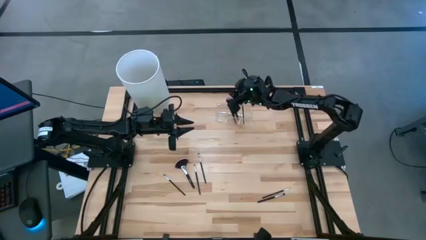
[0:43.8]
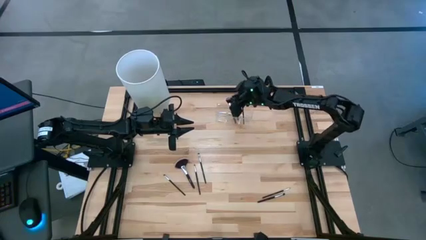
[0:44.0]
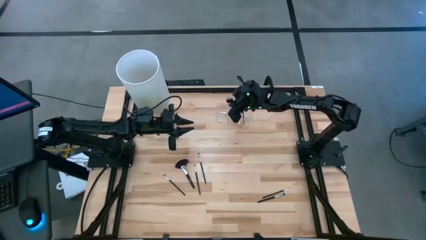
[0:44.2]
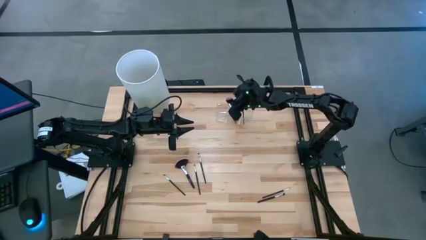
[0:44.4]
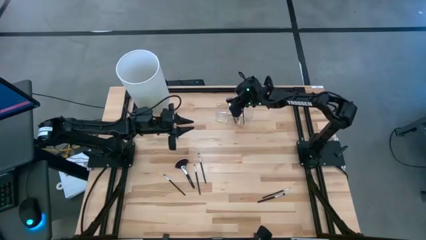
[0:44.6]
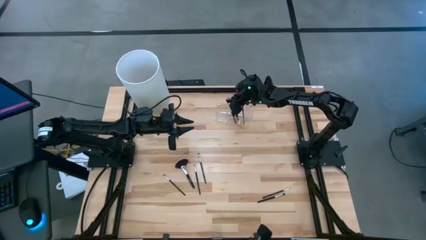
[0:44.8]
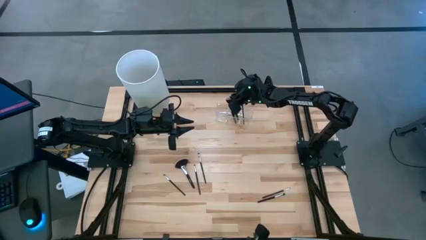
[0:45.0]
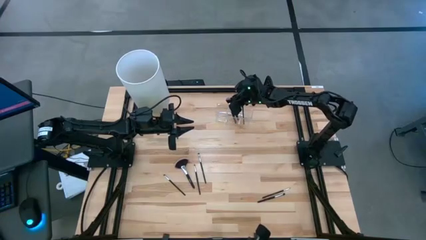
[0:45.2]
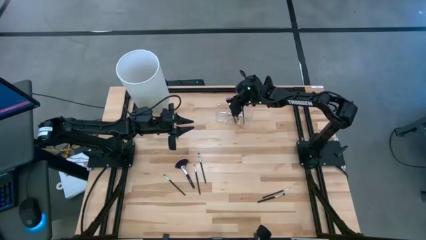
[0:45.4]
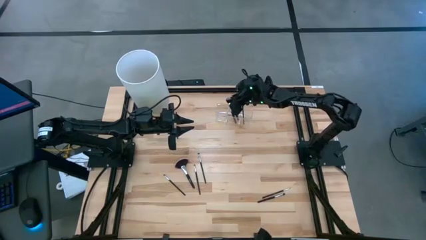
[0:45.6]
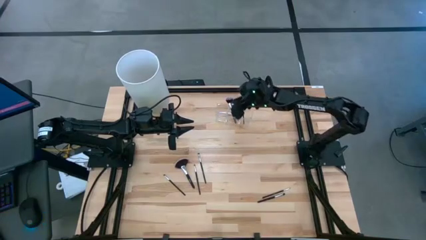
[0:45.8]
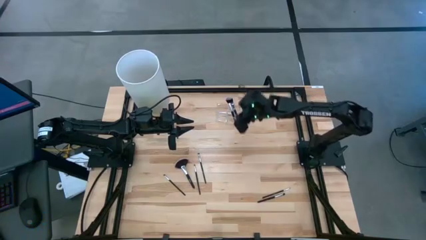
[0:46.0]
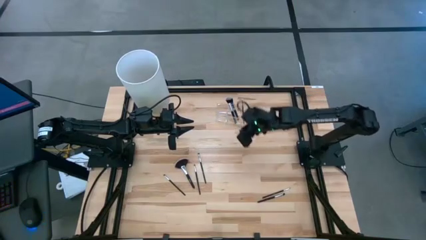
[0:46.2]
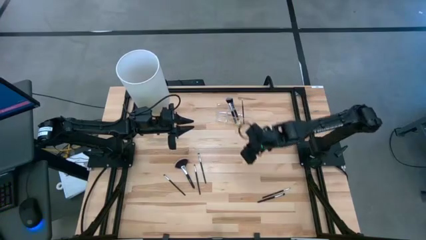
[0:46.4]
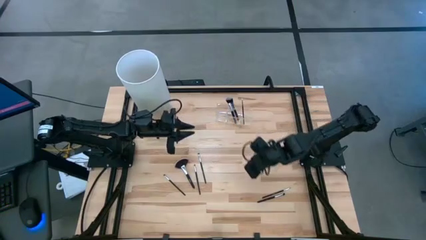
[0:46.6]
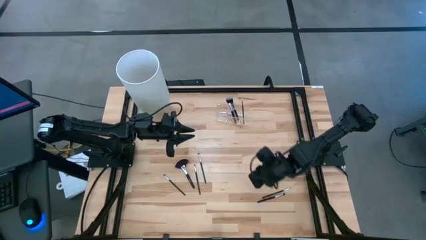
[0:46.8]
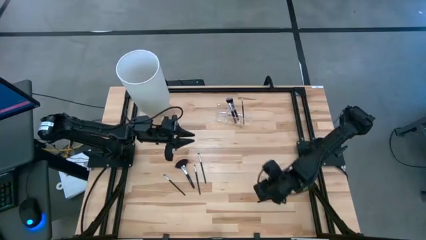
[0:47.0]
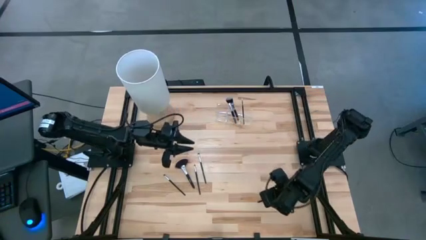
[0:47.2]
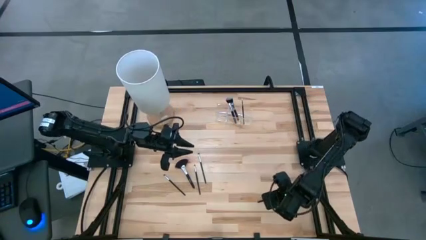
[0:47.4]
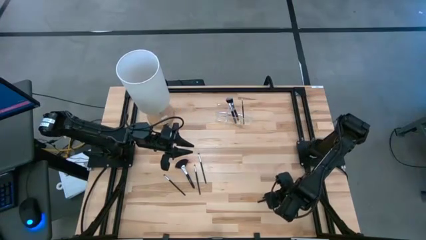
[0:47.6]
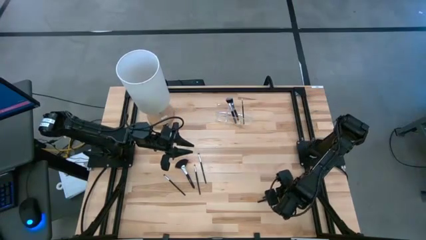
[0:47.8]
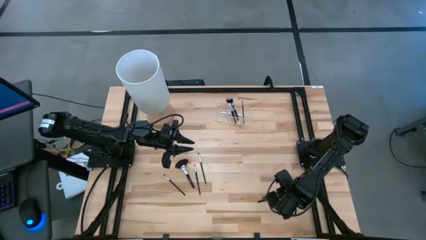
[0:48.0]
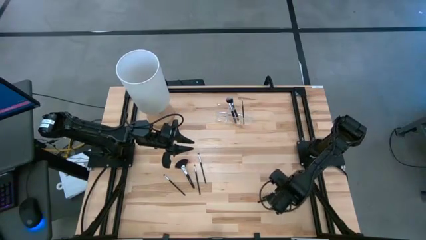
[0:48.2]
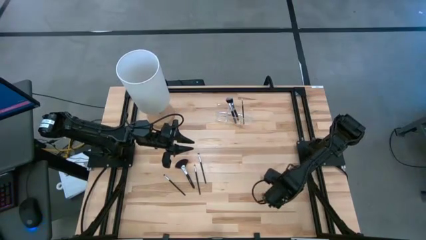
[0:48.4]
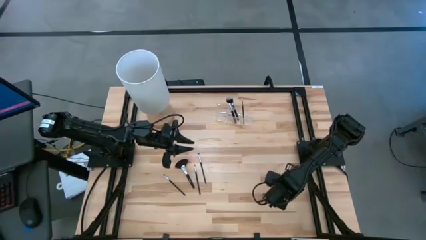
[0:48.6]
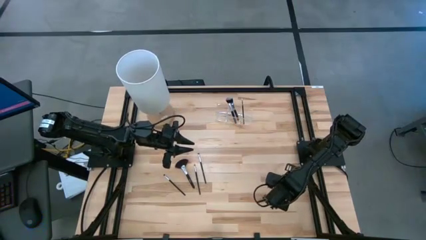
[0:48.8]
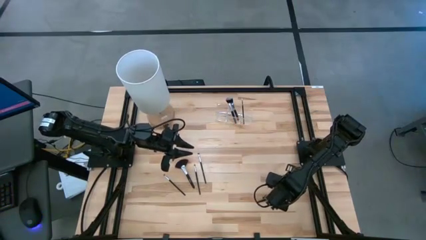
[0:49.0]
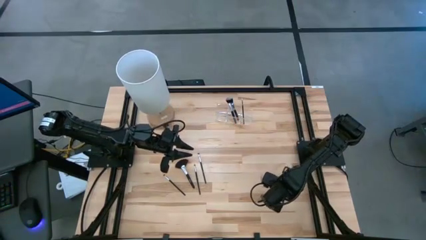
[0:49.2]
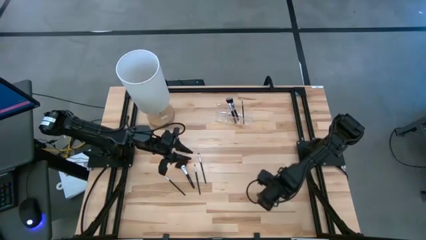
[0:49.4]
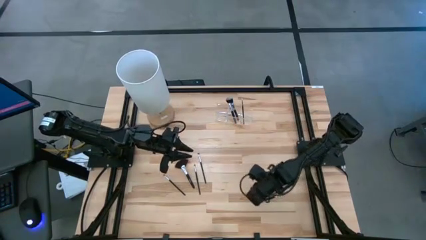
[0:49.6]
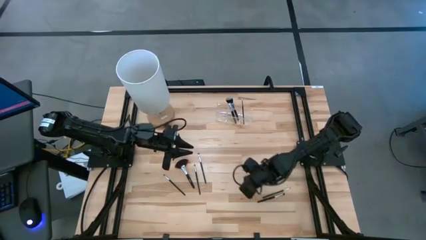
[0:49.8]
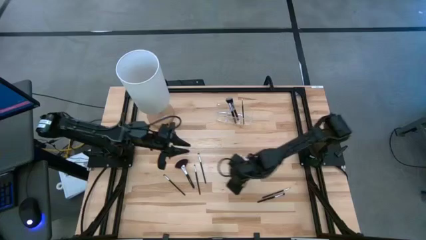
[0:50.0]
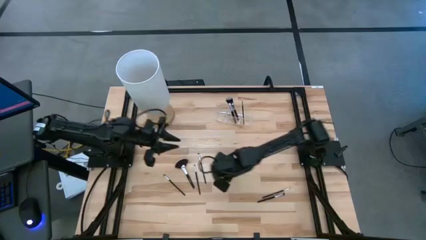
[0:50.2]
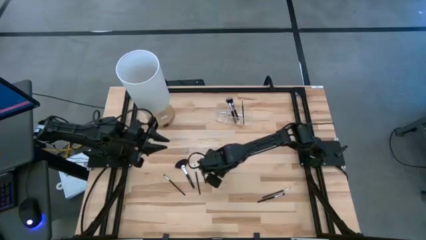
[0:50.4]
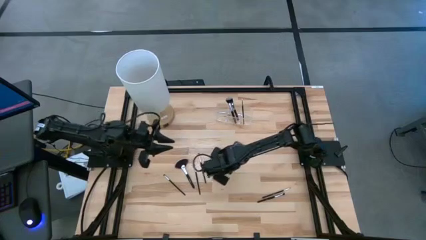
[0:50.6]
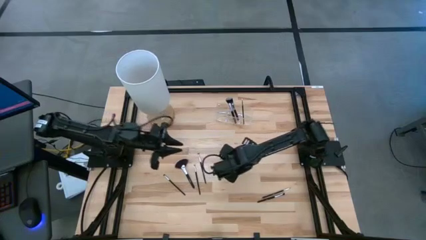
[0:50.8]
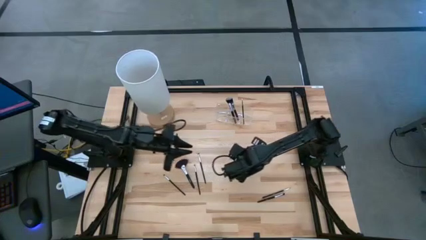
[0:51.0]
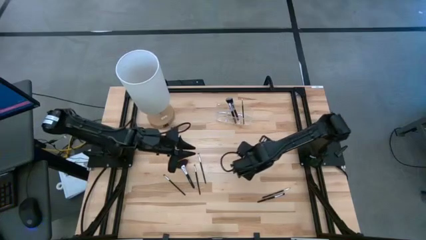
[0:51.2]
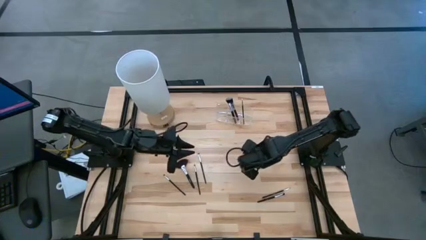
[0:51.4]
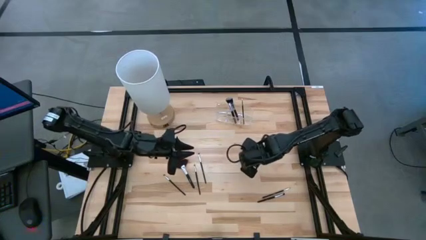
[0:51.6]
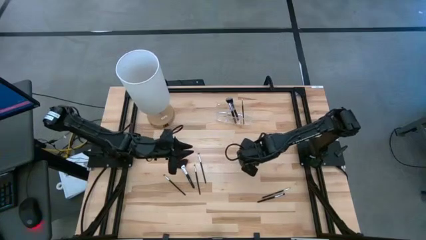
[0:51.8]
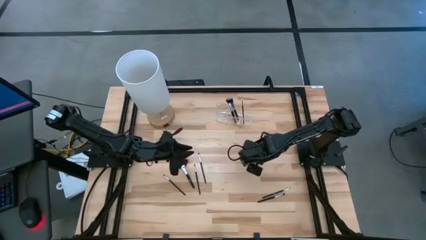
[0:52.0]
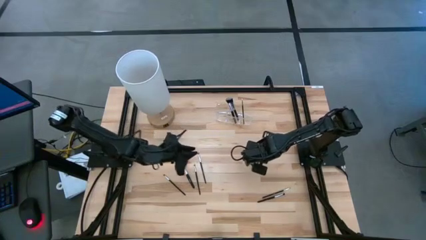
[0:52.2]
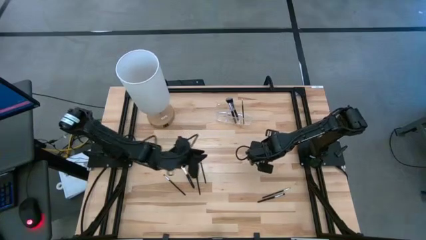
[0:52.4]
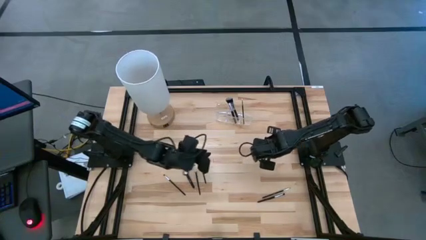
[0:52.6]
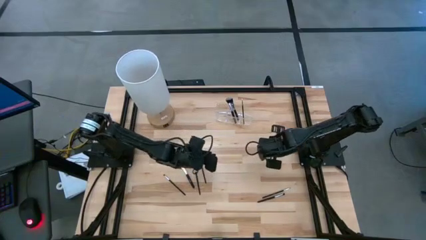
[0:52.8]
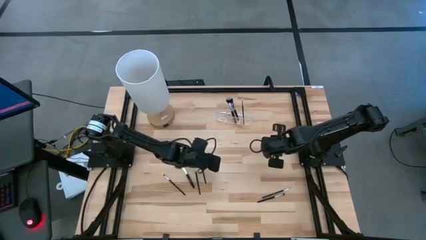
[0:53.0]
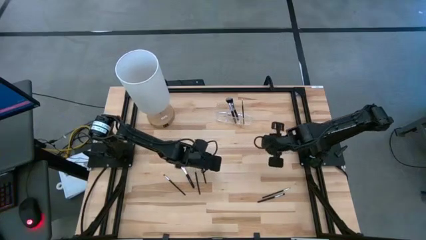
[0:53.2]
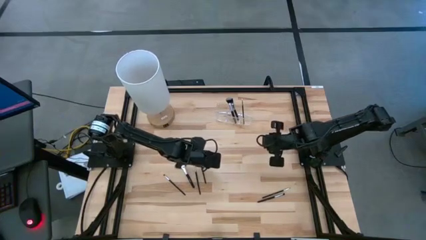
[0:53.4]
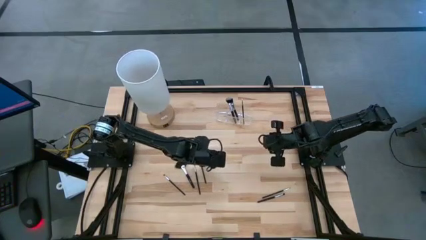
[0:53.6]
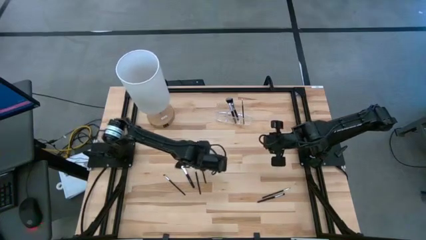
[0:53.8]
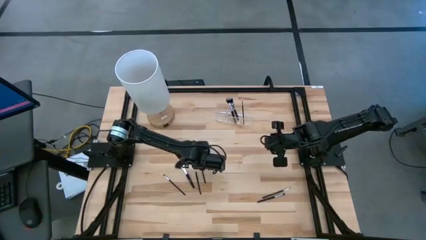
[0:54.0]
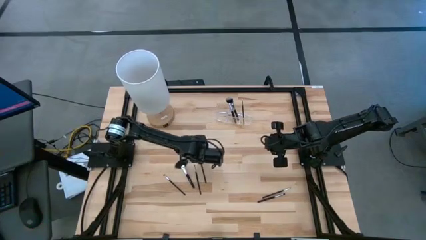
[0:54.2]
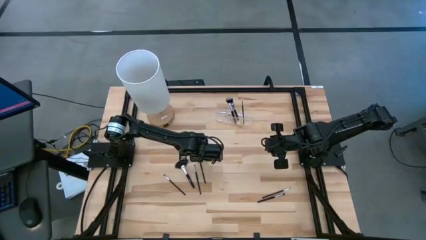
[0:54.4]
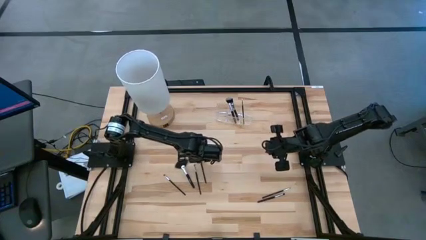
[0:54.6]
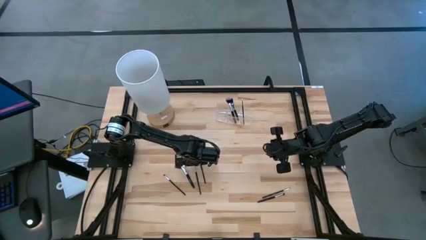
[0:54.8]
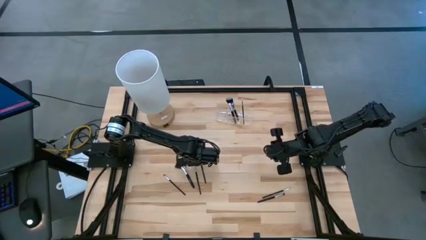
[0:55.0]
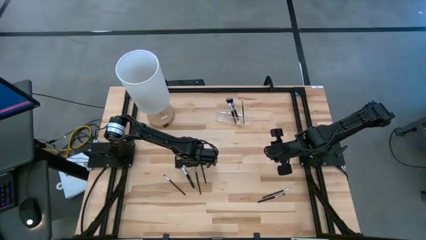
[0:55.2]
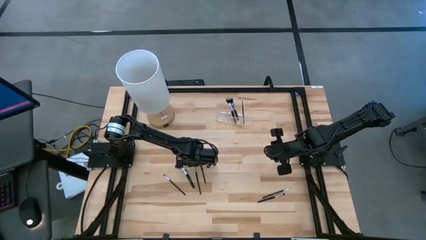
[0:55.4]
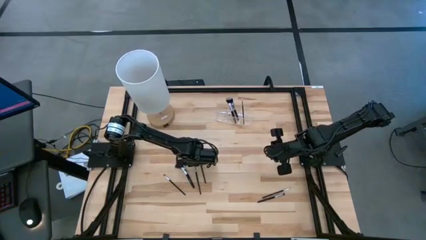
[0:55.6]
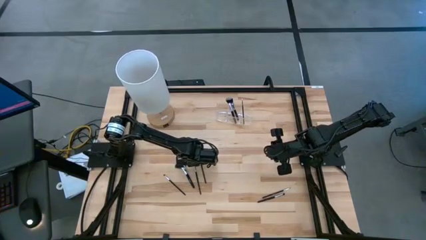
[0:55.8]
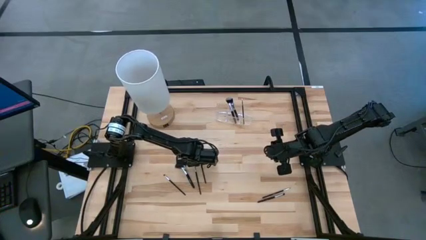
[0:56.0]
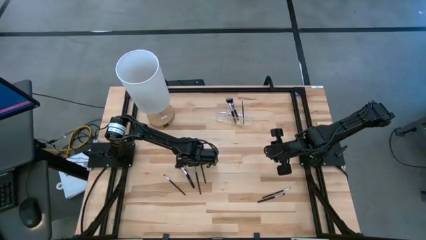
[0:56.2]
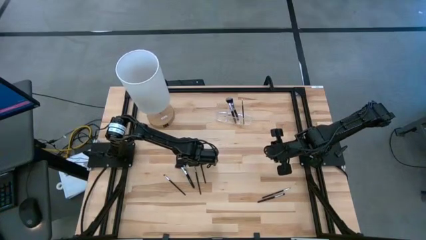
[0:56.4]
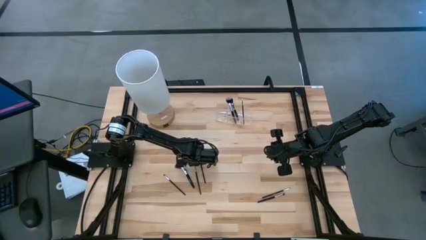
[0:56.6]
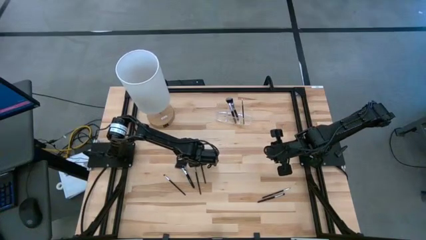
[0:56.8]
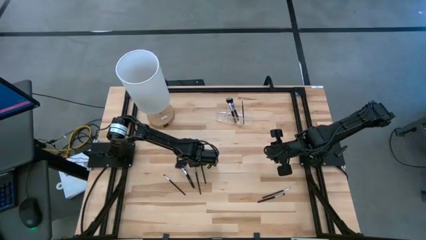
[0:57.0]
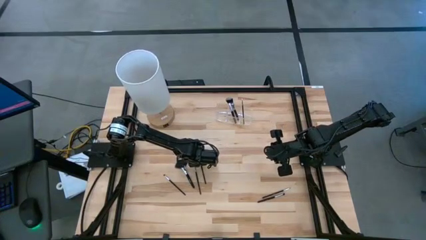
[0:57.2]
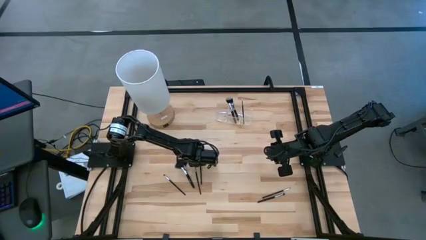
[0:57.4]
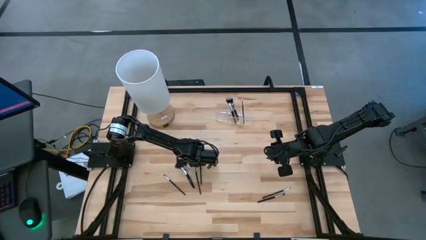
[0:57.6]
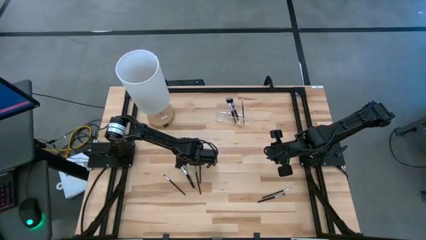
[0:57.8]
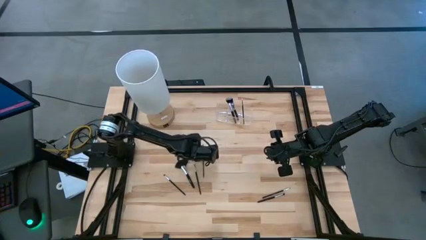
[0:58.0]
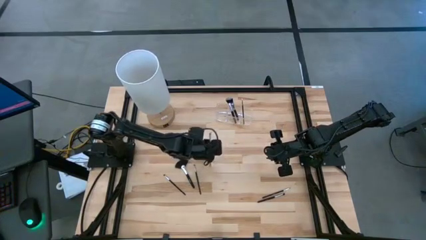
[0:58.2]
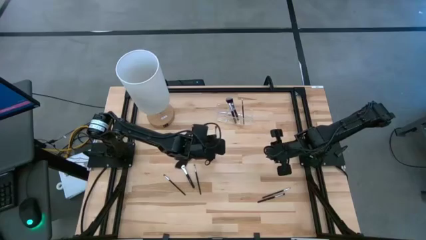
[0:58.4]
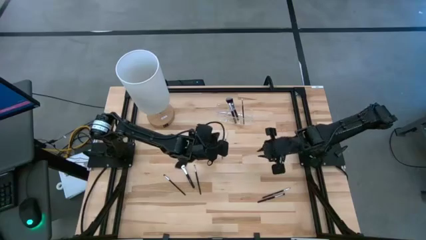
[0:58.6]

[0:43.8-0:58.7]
Task: Put items in baskets/containers
Put the black eyeshadow brush into the transparent organizer
